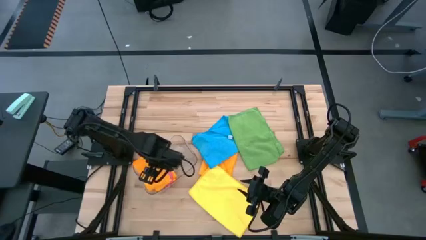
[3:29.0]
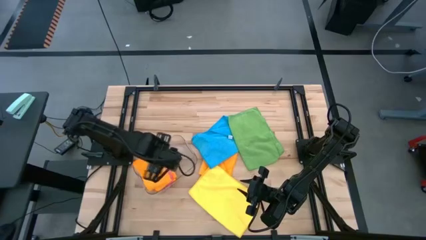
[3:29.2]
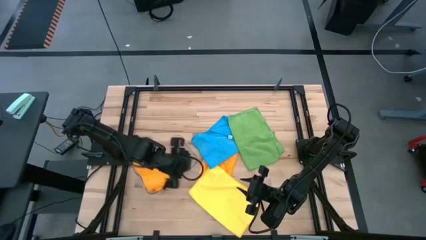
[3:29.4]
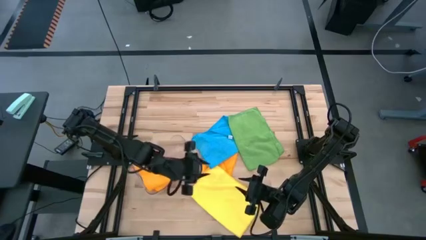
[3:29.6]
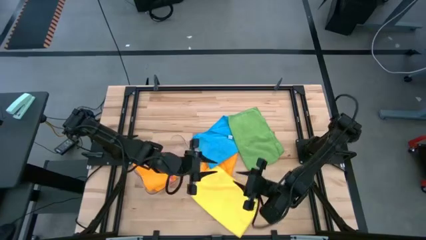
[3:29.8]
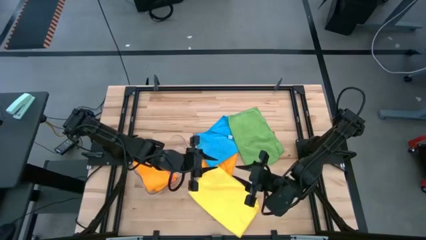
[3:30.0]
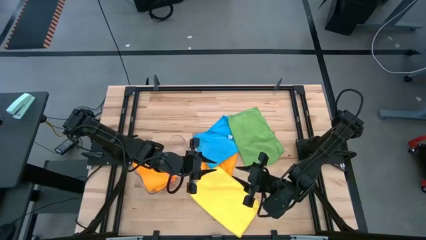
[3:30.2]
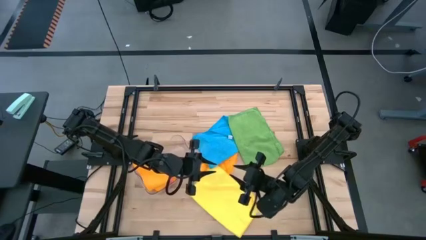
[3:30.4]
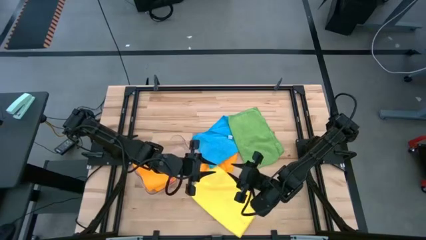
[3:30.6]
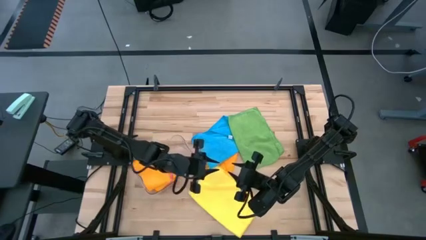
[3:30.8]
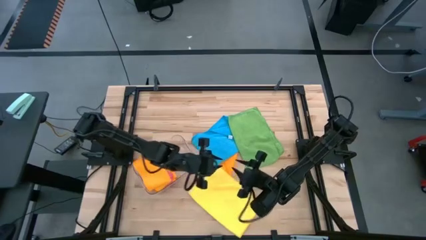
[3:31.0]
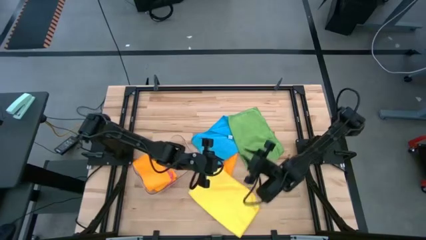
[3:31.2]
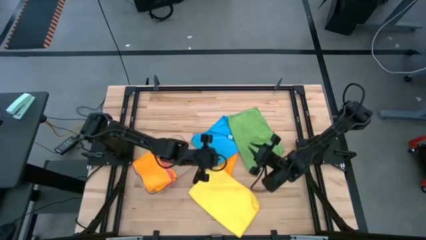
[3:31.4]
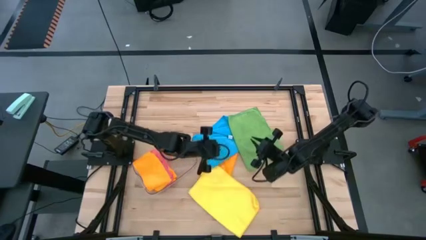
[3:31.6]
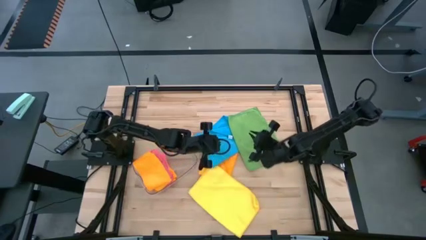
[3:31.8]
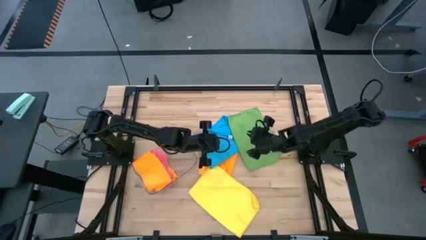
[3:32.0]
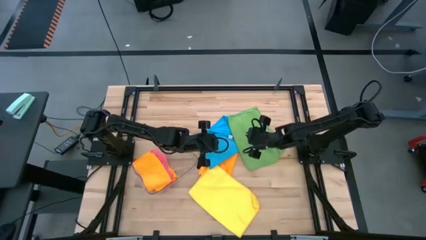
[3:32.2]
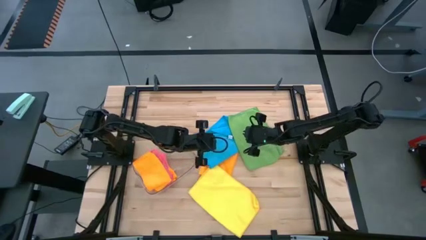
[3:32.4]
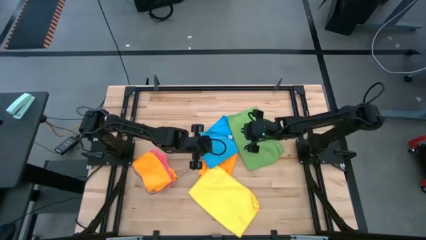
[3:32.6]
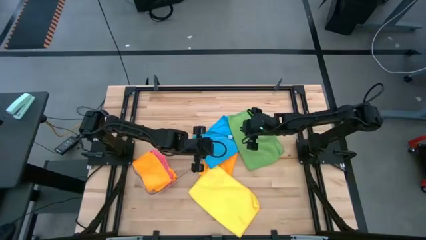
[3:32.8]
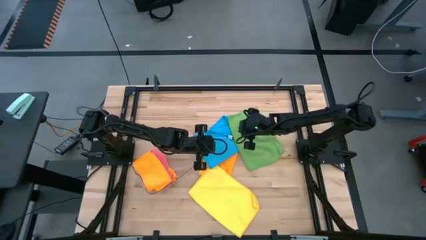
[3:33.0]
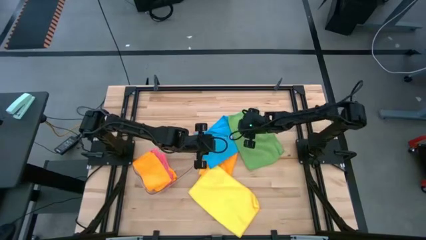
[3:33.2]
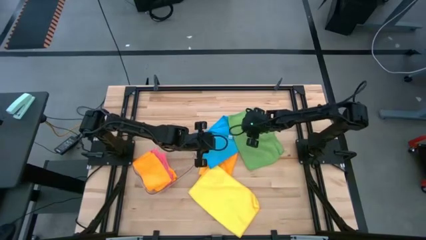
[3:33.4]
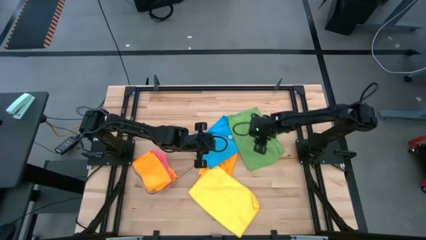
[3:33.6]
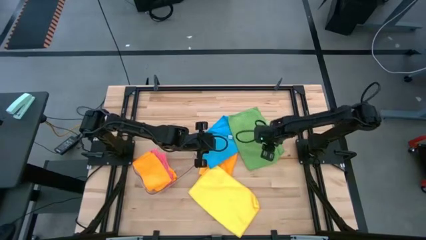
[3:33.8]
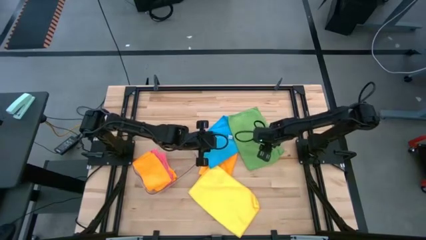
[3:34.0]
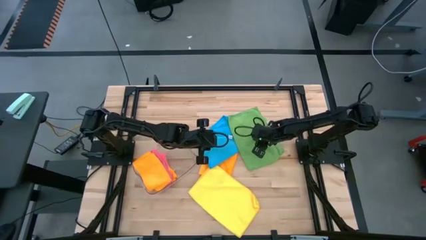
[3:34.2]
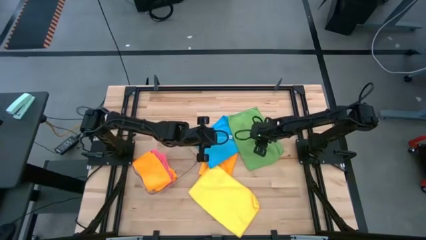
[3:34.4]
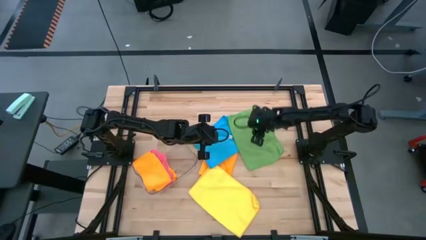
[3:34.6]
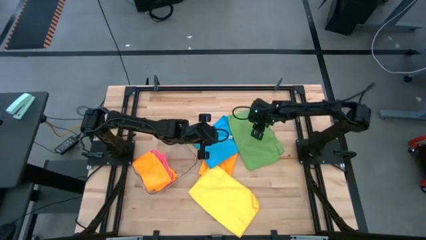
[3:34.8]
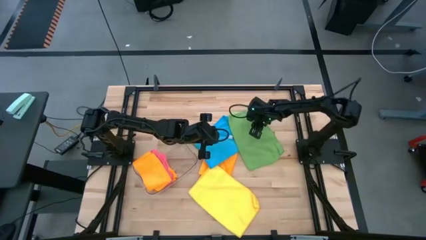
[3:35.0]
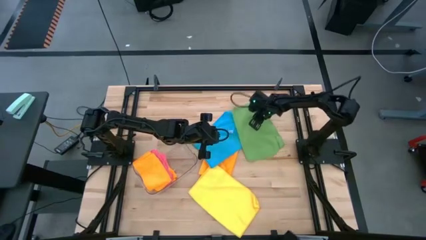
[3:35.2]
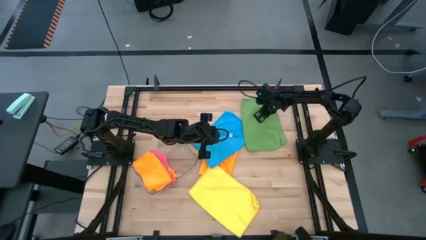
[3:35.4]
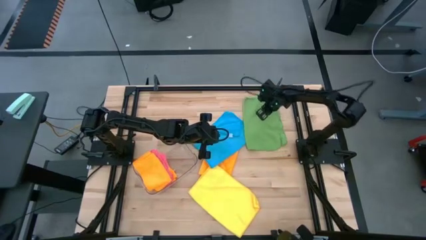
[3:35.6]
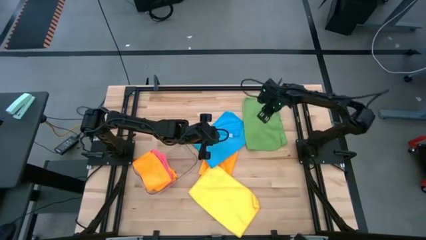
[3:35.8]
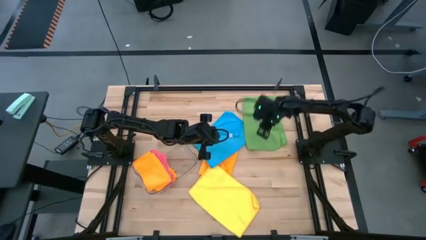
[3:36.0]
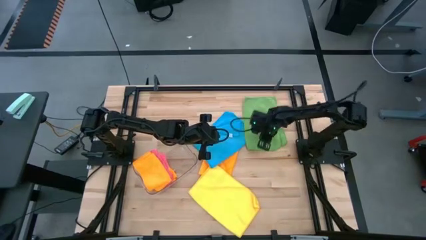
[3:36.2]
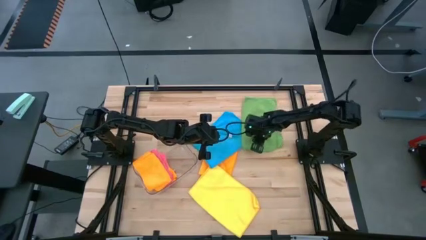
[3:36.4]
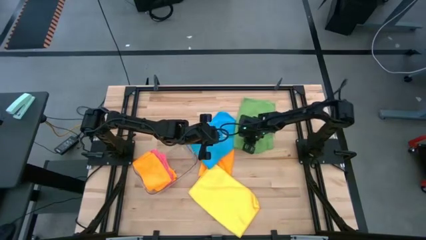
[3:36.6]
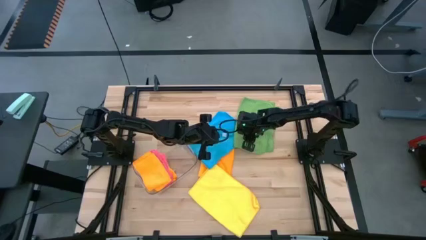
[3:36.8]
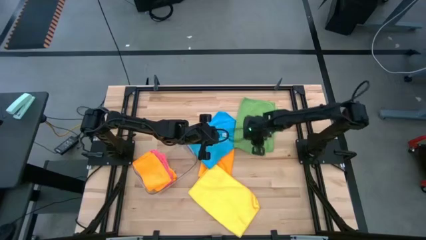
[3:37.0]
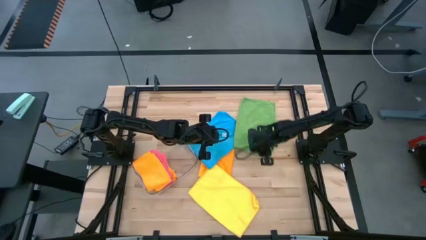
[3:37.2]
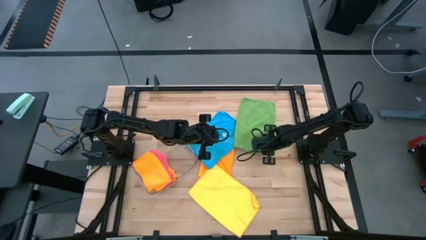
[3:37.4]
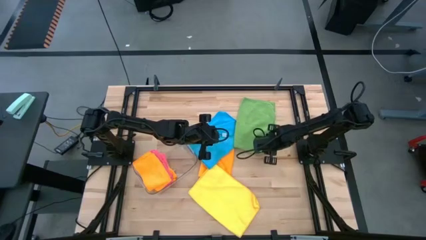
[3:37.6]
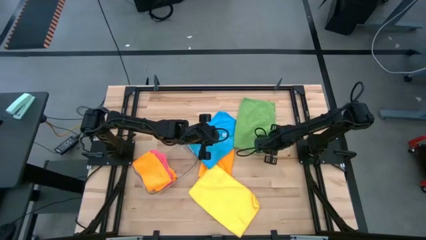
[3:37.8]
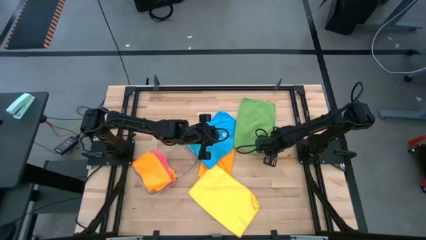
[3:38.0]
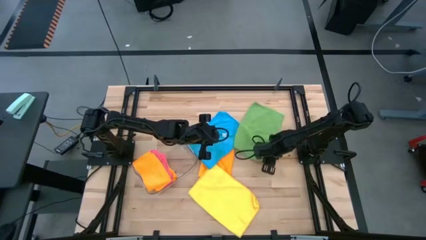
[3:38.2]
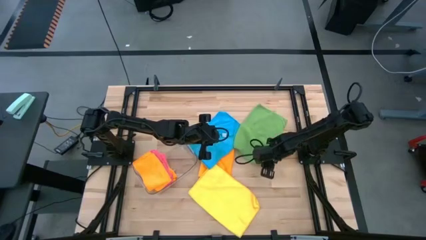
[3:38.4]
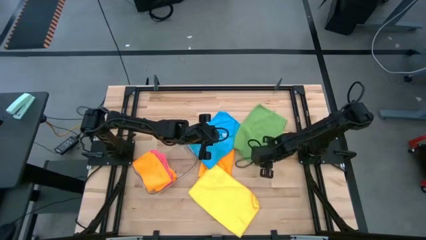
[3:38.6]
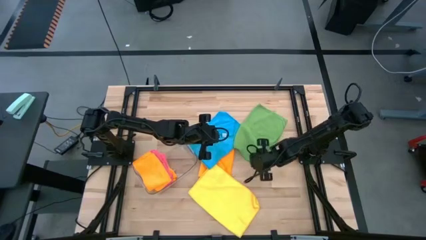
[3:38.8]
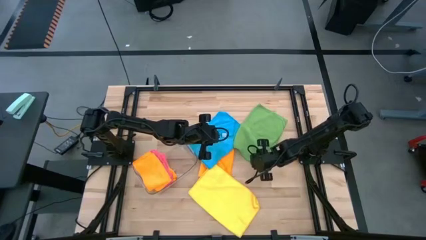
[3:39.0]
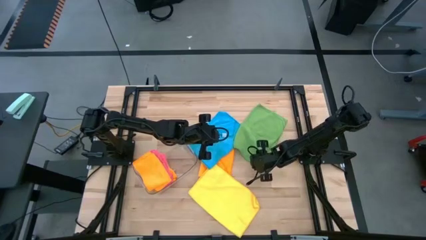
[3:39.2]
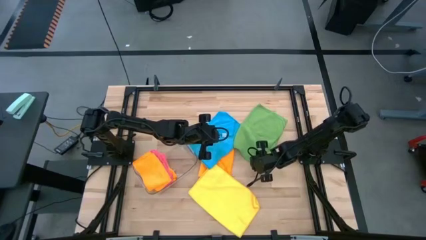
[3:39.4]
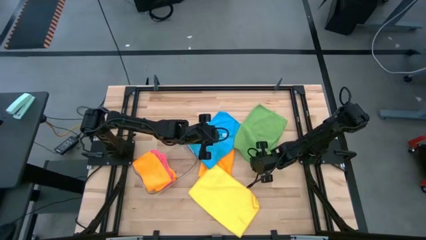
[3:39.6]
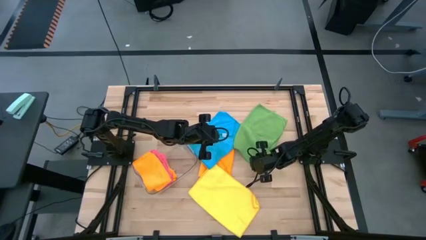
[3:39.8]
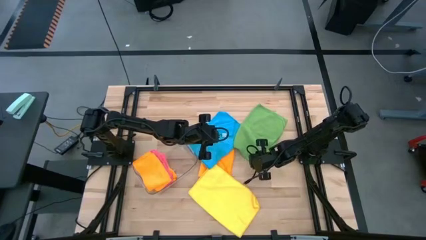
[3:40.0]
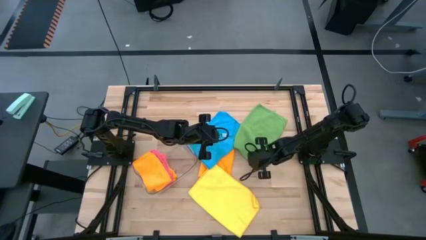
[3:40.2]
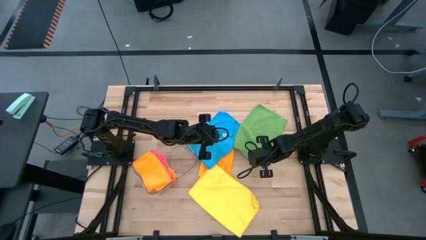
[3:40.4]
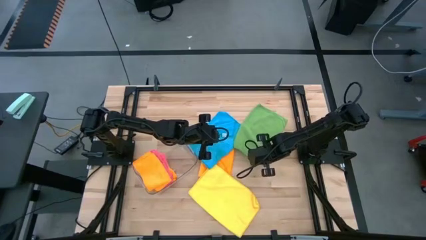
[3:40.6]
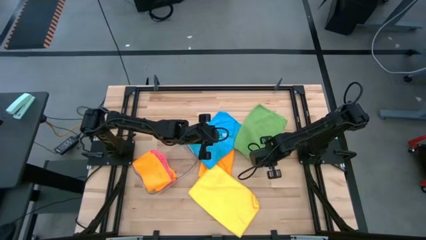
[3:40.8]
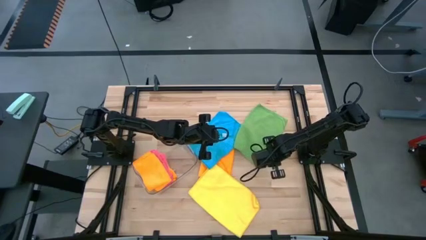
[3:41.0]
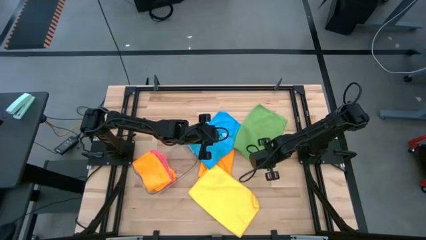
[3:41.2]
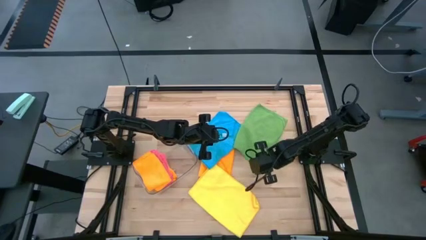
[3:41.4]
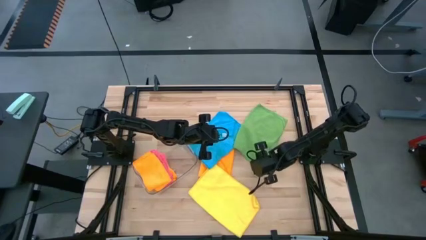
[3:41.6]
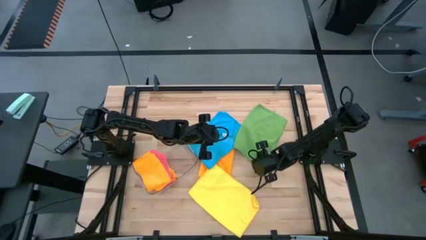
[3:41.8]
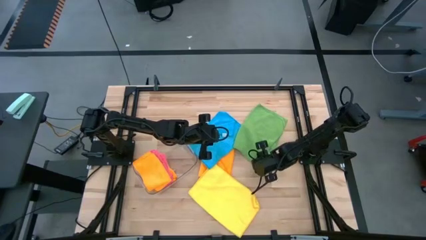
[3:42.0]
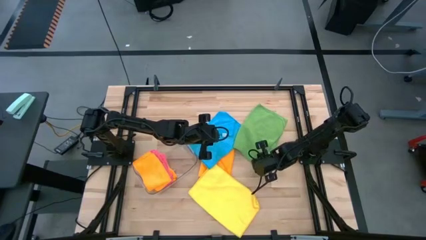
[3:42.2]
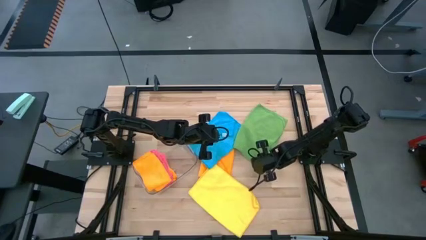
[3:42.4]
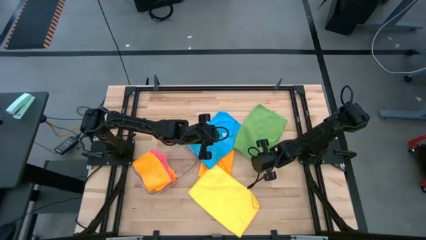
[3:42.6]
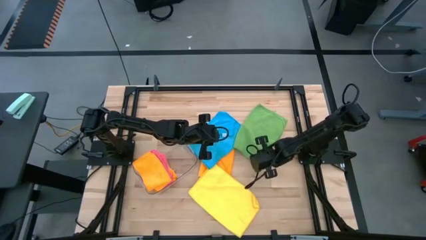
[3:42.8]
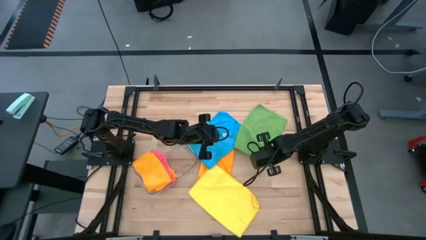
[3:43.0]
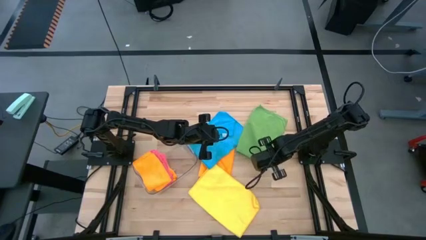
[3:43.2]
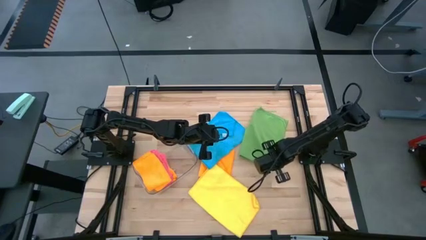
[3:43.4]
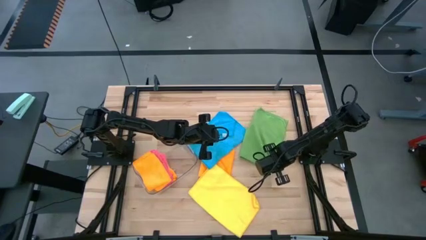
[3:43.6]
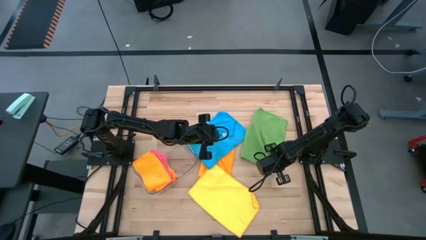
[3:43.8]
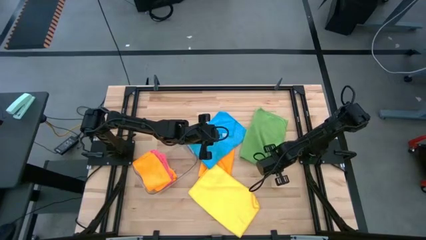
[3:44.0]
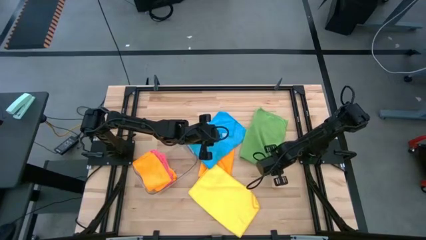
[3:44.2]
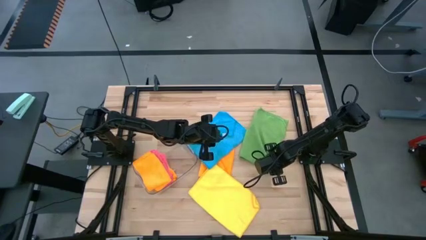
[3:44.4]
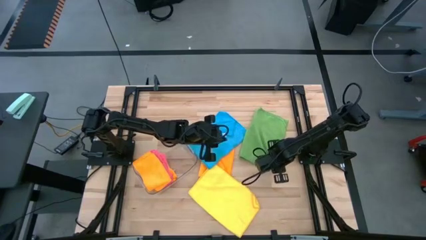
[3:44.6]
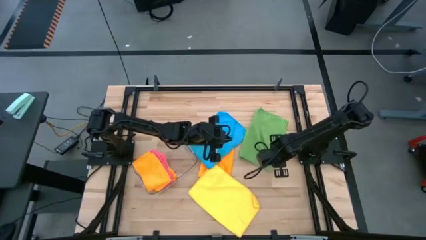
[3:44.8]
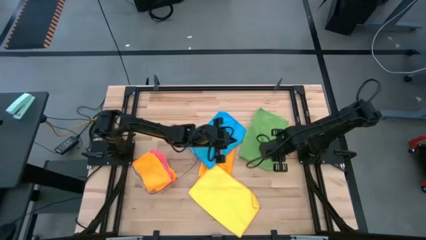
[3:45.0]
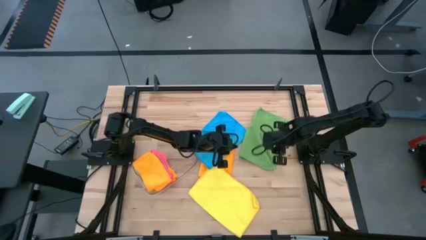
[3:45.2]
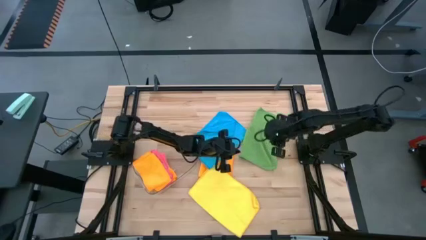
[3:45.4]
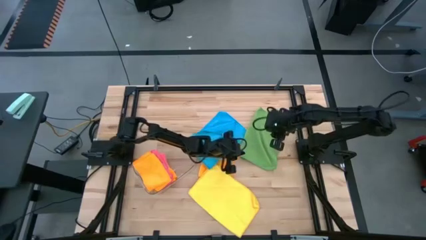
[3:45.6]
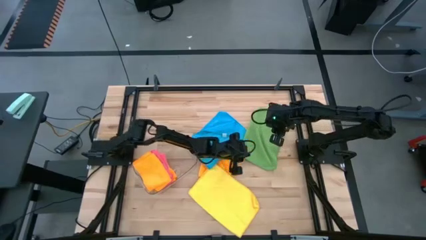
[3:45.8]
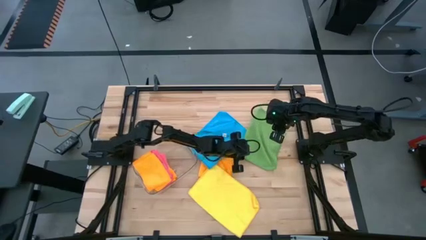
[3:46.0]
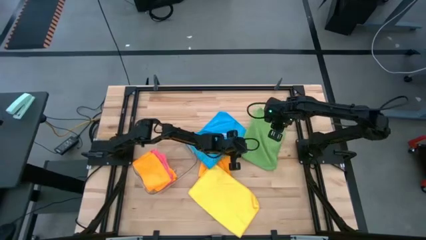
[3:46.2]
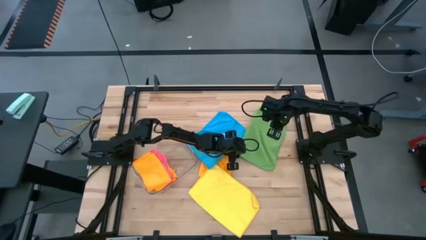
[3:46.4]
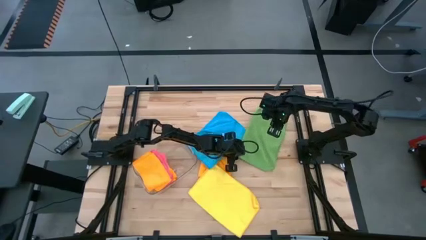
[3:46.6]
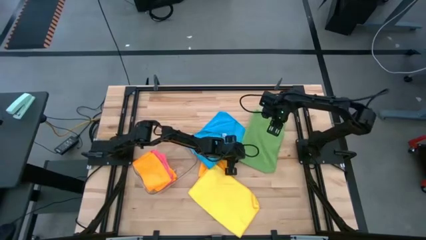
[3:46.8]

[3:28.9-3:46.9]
Task: Fold microfiber towels
Fold the green microfiber cloth
